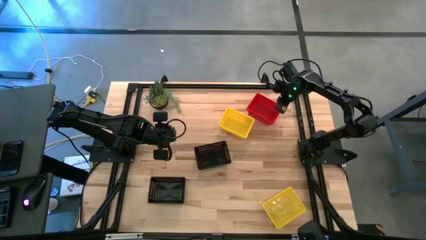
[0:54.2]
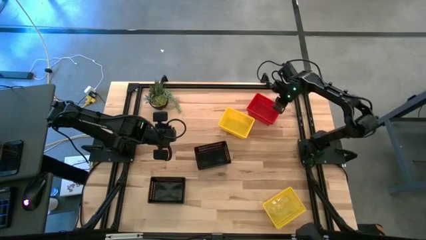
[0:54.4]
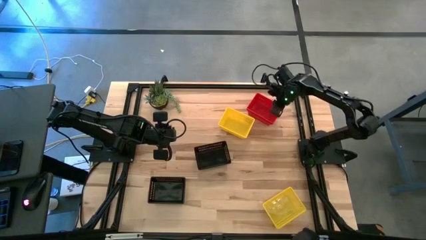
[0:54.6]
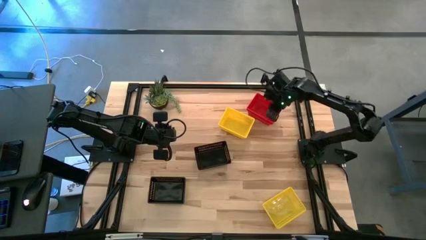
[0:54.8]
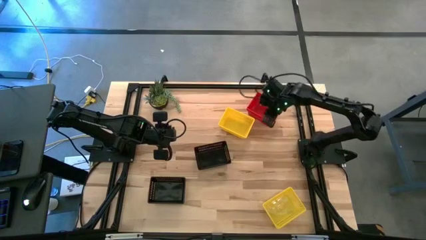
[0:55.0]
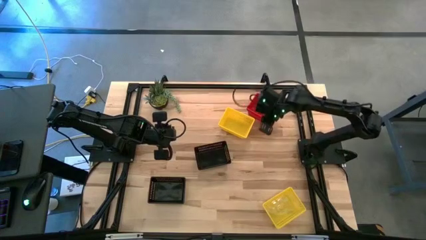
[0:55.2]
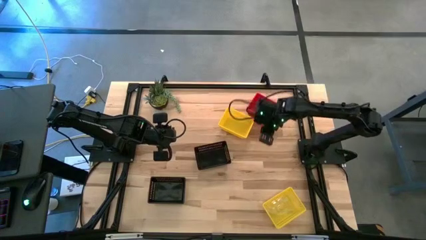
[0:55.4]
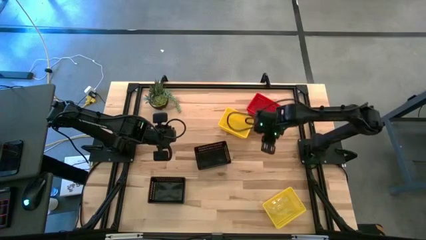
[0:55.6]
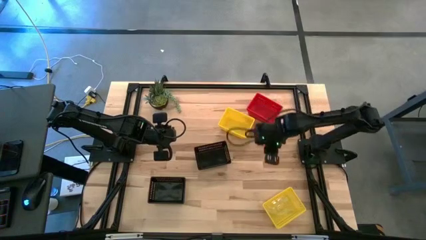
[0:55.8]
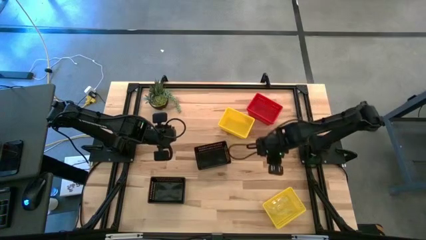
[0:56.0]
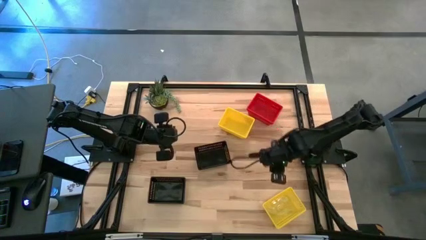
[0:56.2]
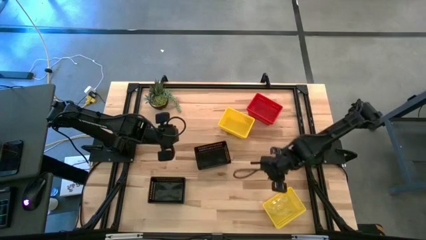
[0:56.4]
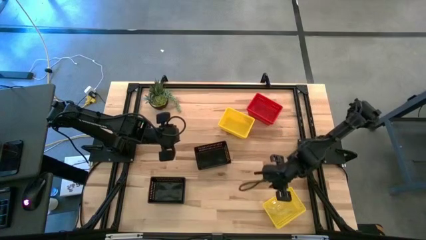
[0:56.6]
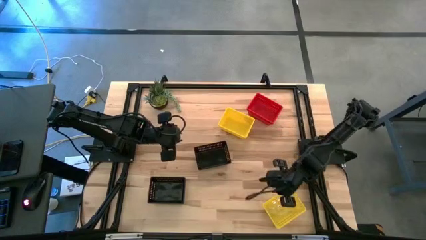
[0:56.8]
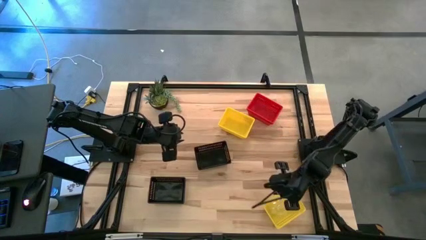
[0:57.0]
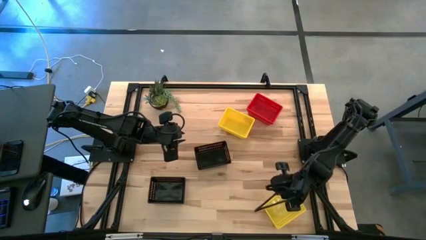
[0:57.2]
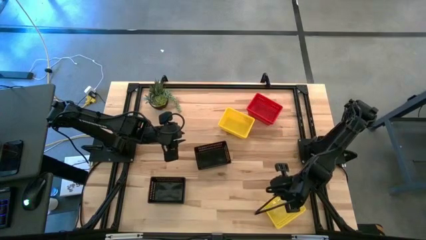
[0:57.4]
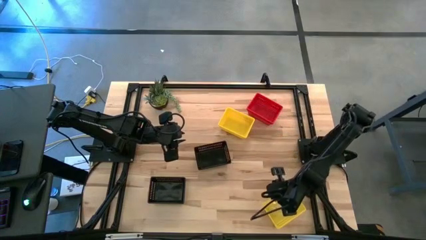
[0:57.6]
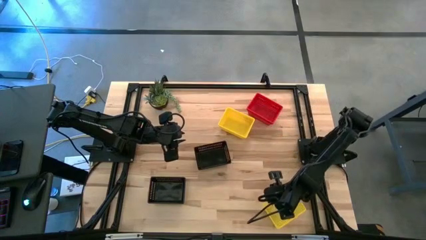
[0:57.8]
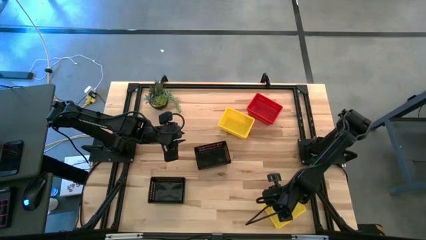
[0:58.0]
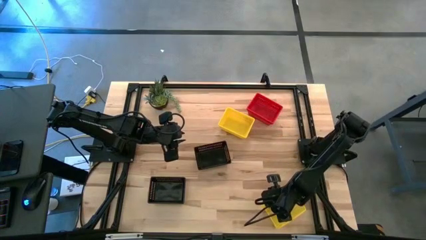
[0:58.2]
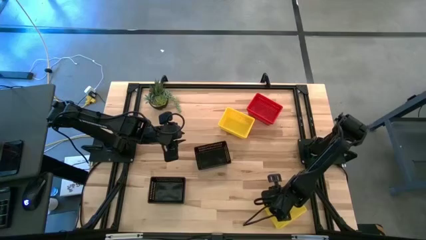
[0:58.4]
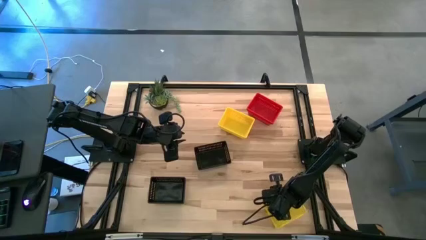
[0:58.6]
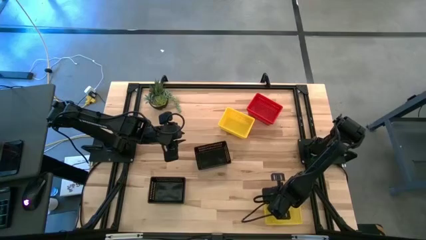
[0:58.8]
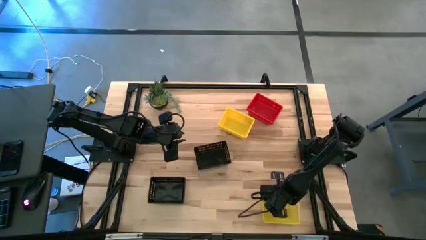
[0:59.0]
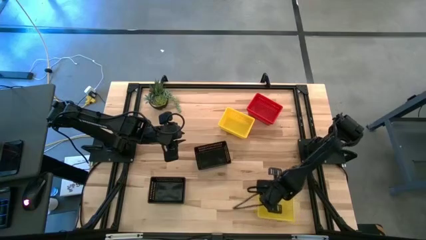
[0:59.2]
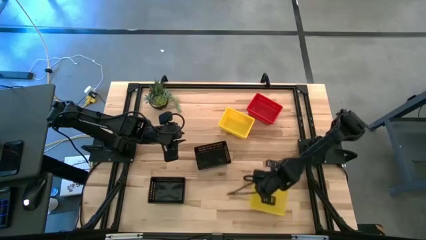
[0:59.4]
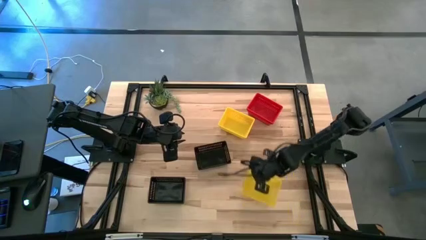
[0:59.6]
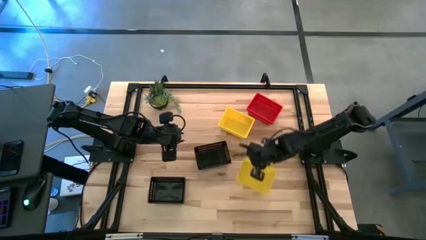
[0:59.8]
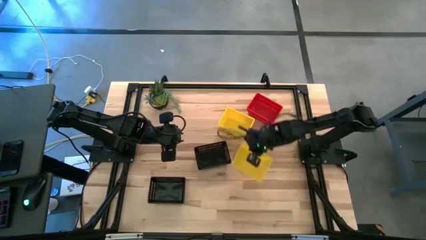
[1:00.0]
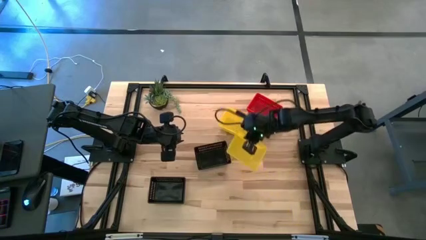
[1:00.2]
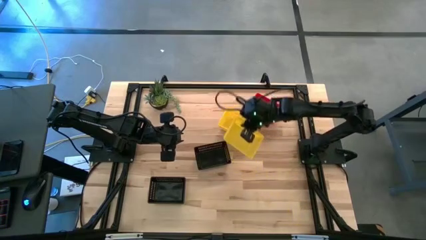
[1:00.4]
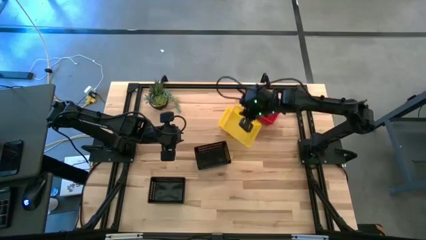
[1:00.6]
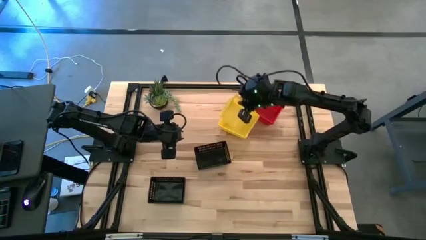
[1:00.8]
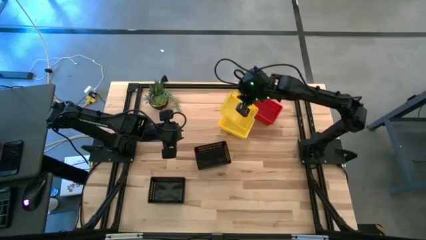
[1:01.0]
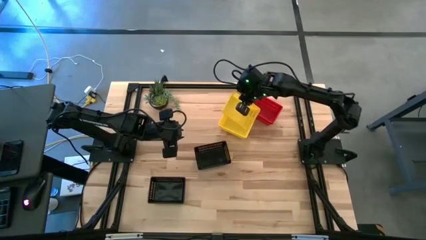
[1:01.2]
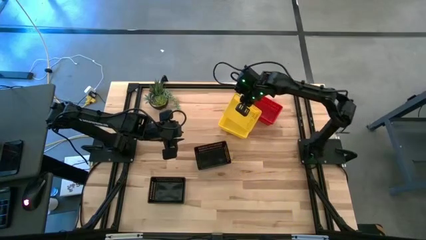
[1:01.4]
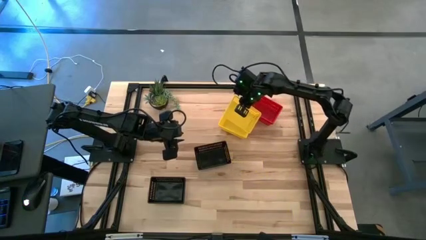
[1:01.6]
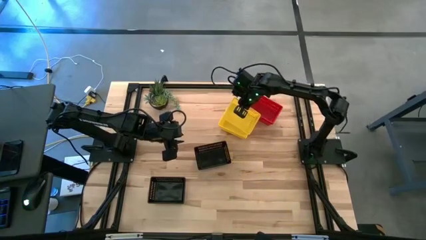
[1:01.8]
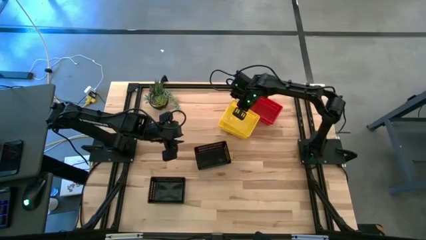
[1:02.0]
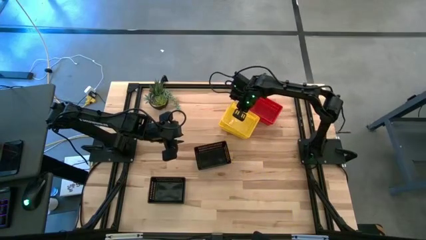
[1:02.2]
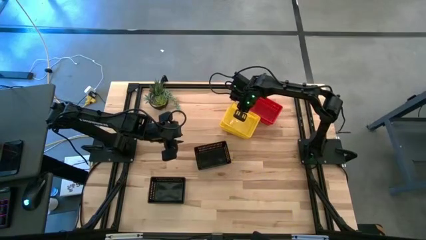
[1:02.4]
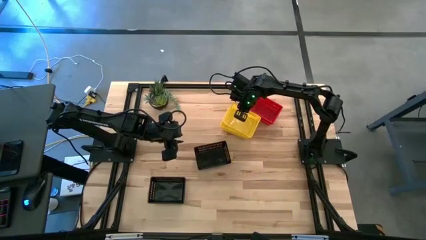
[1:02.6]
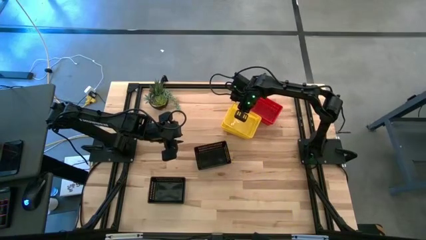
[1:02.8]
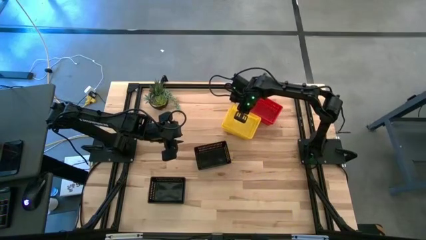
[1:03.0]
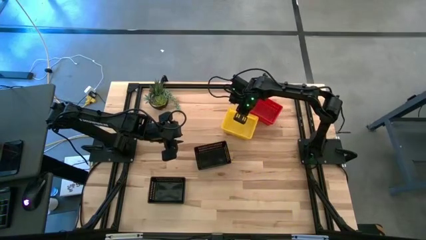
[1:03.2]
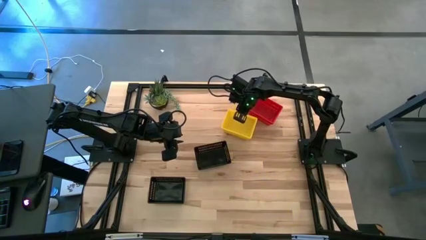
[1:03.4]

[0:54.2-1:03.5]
Stack the yellow bin on top of the yellow bin stack

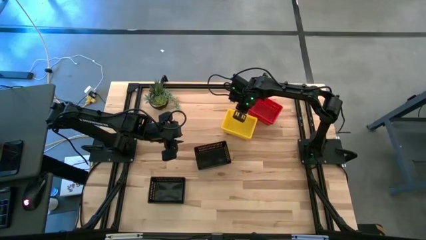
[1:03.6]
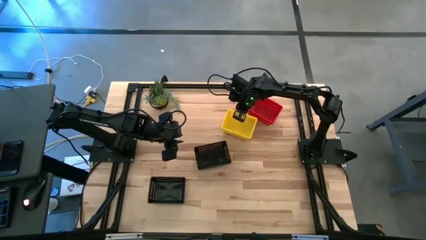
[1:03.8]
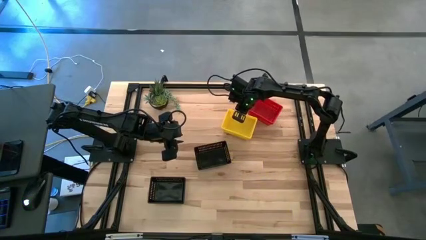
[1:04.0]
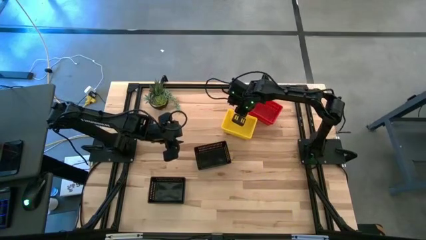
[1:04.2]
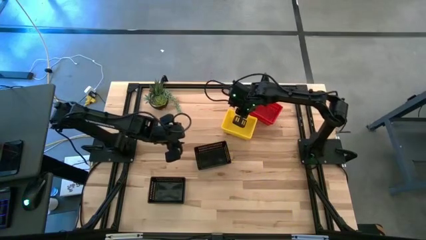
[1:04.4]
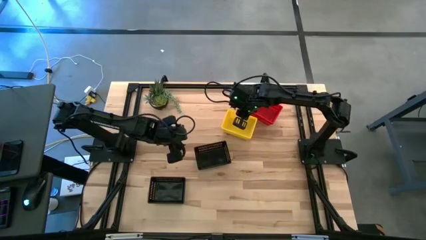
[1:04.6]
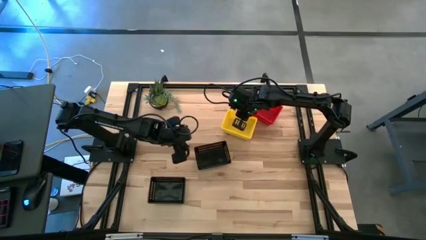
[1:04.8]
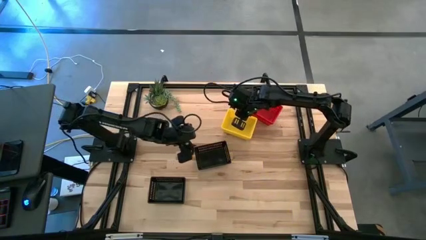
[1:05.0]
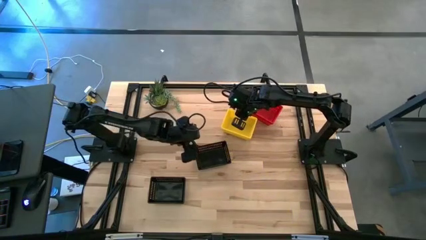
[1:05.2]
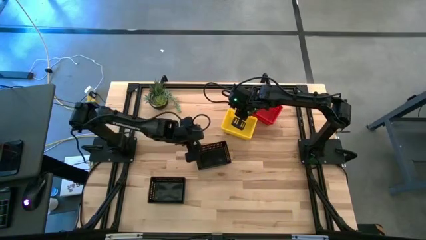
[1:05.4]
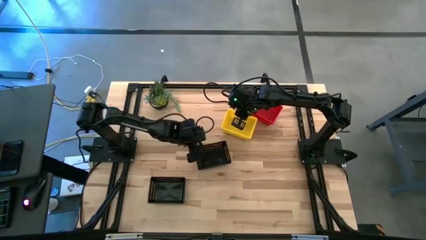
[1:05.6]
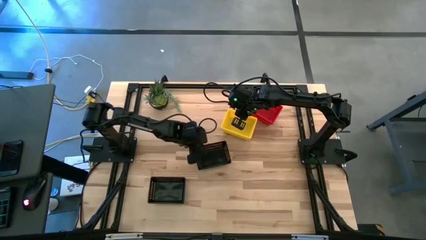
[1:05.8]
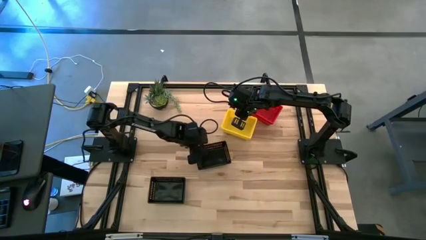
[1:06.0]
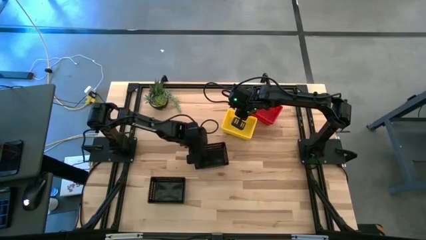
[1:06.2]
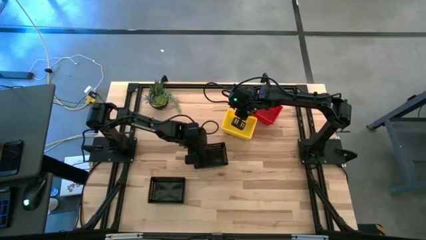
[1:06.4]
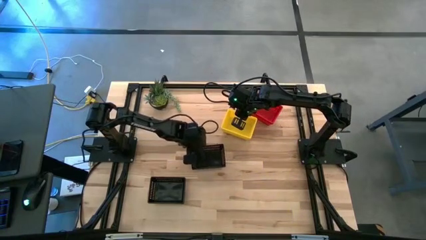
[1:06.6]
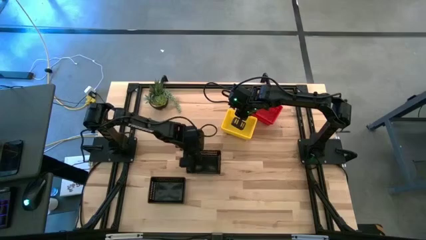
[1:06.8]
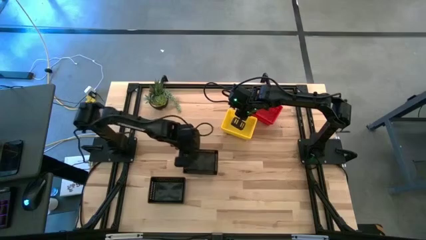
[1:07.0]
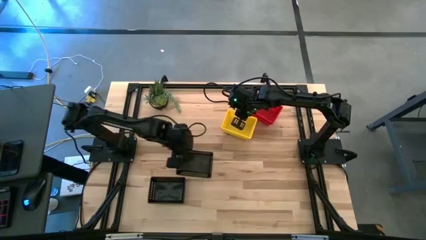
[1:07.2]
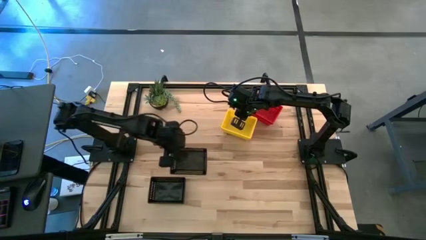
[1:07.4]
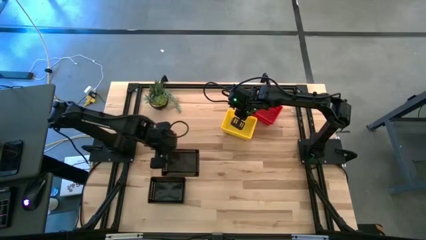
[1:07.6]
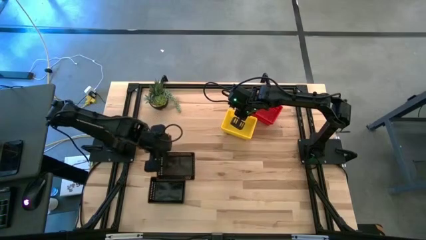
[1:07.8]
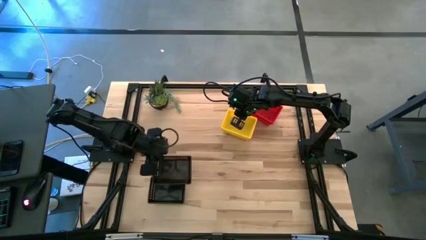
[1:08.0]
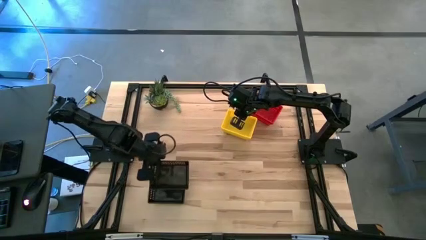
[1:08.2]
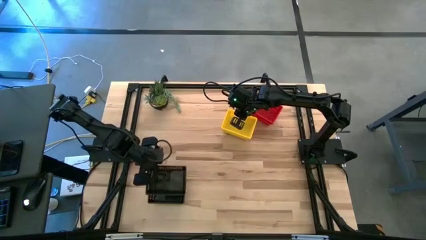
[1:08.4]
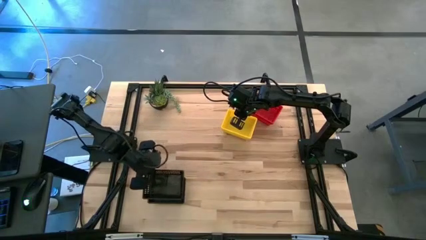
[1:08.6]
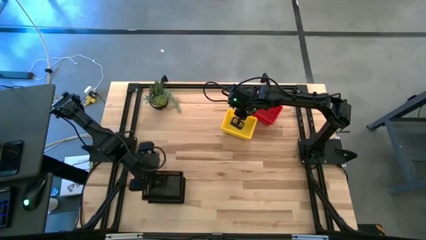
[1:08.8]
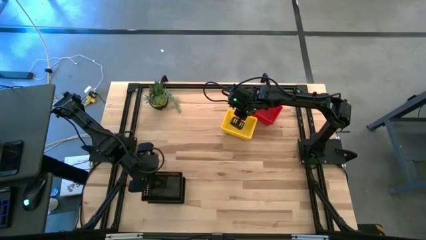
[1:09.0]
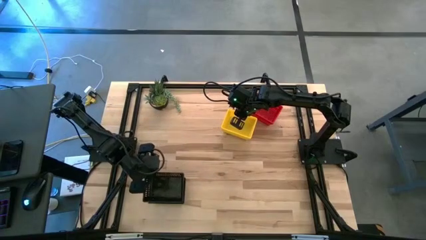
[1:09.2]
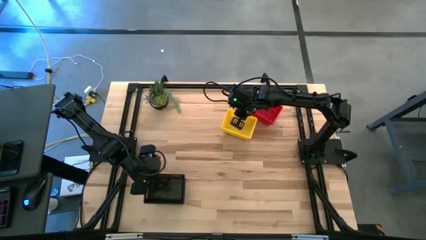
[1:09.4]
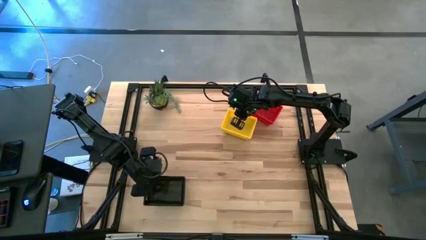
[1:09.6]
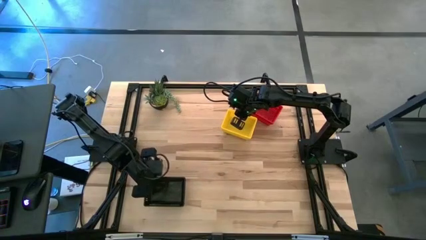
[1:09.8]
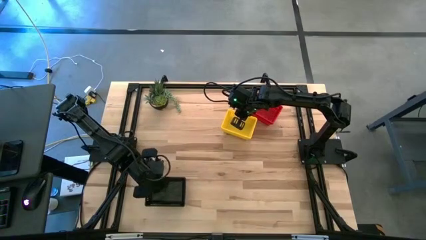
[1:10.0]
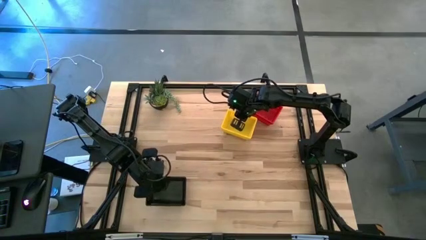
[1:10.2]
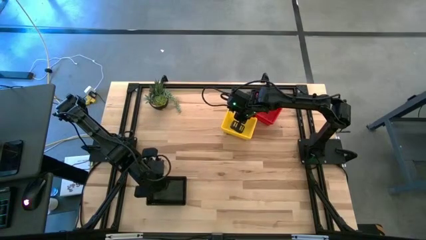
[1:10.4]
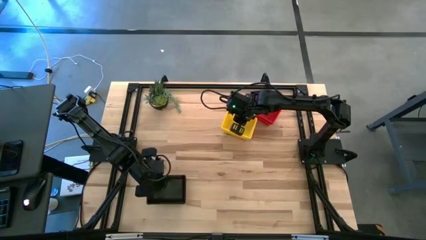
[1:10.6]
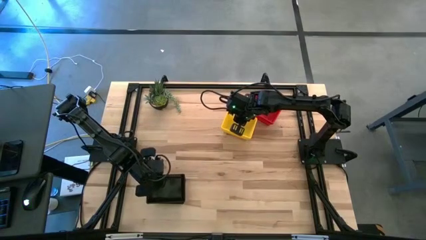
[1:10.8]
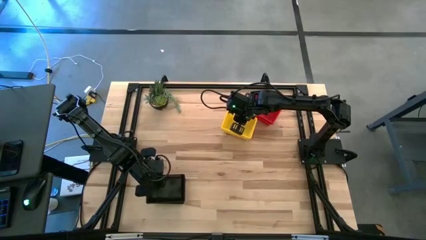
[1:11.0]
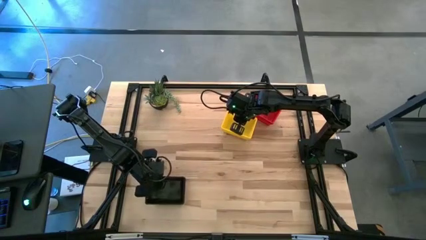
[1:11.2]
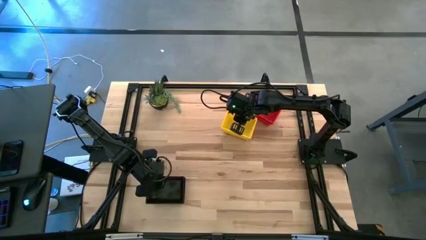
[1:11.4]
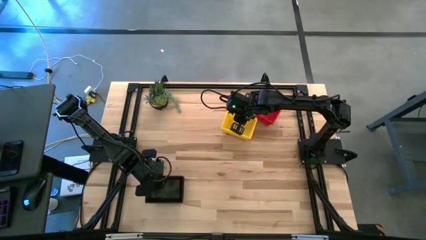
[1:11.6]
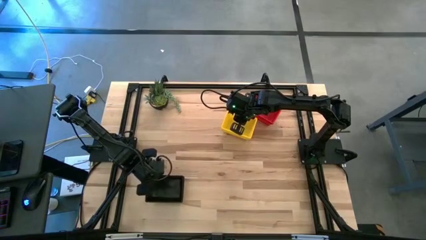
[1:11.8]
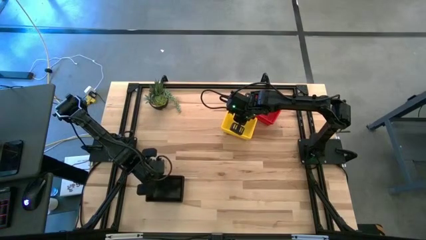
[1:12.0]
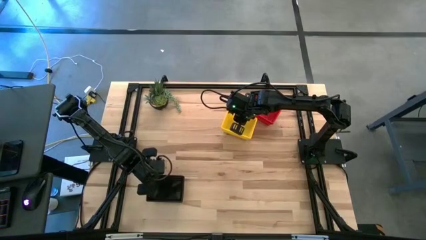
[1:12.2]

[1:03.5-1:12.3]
Stack the black bin on top of the black bin stack
